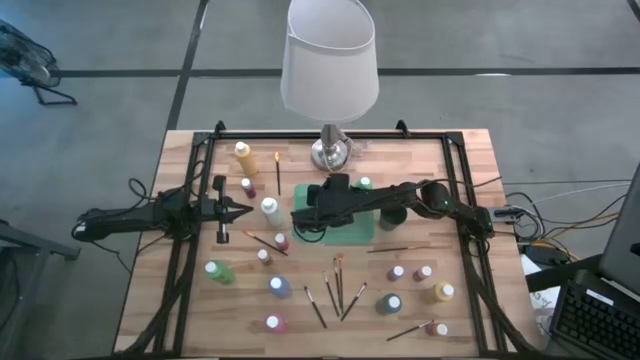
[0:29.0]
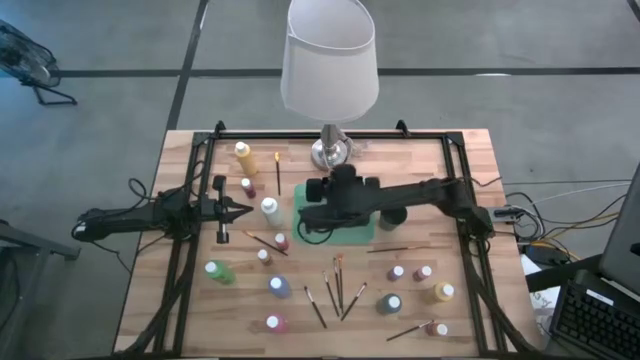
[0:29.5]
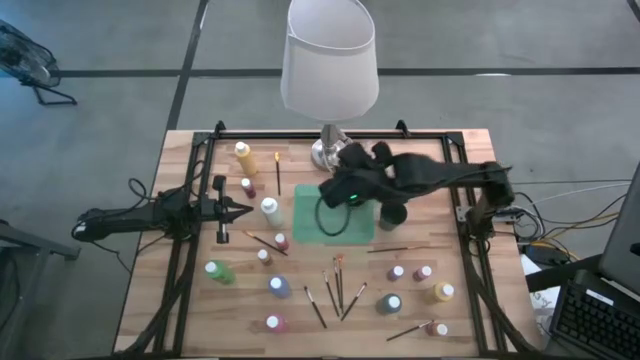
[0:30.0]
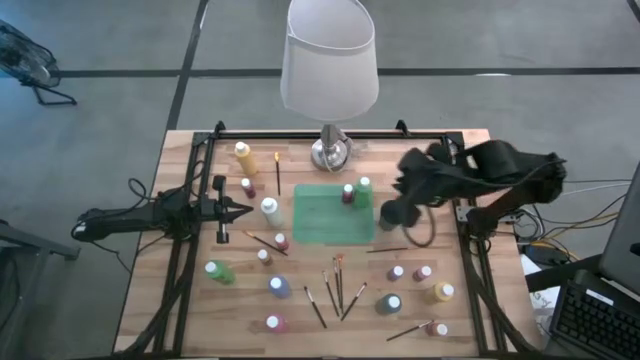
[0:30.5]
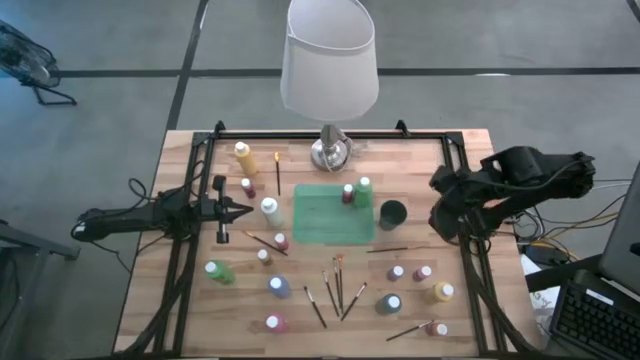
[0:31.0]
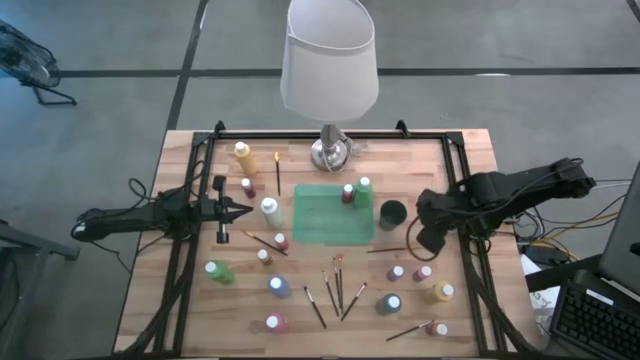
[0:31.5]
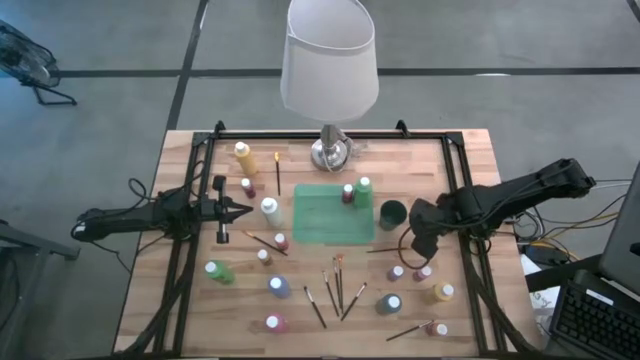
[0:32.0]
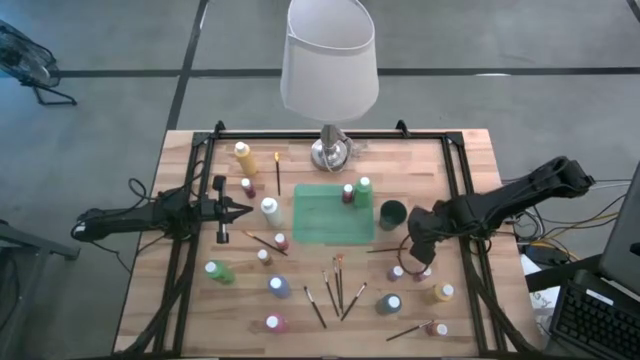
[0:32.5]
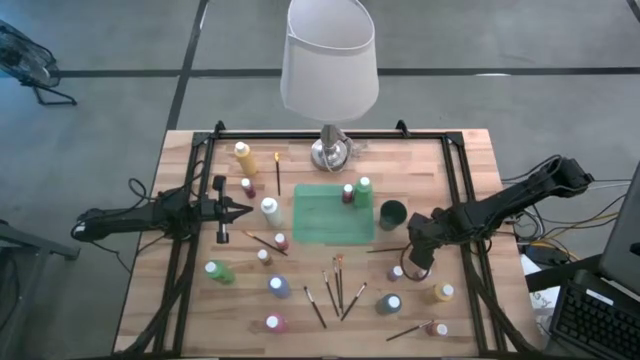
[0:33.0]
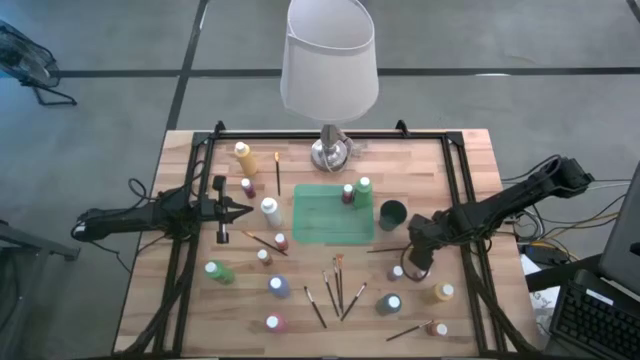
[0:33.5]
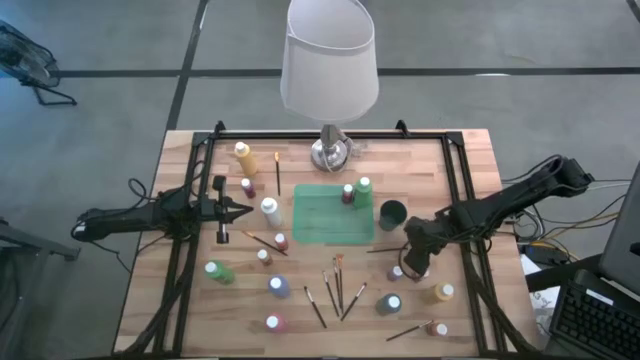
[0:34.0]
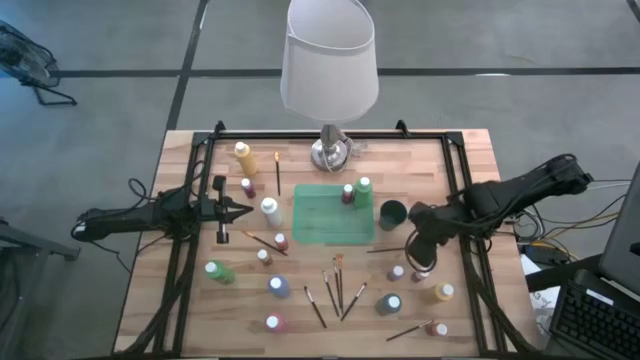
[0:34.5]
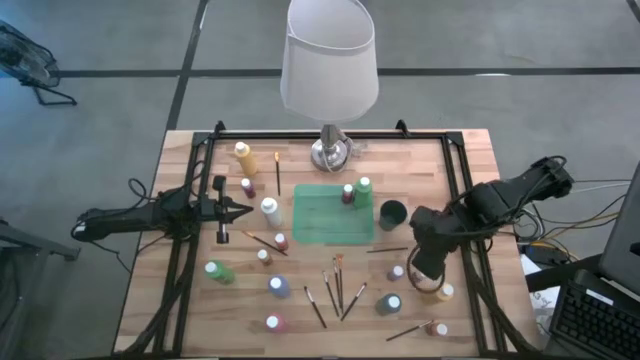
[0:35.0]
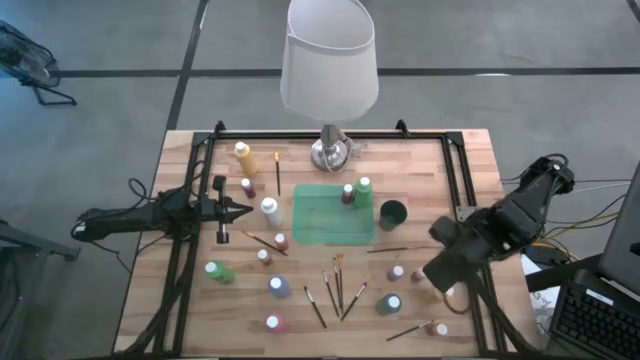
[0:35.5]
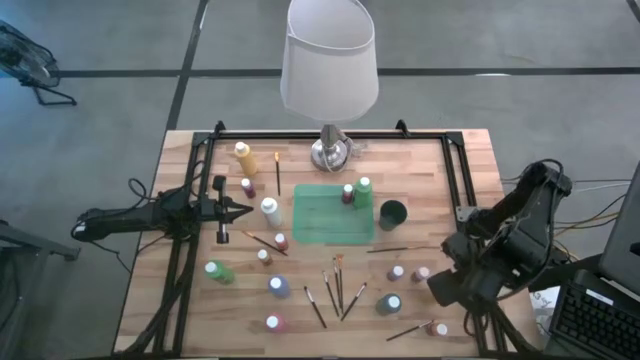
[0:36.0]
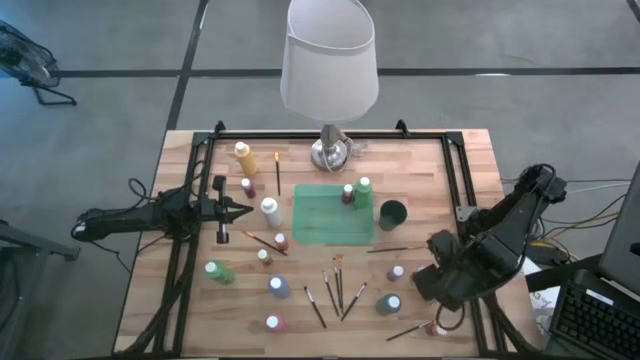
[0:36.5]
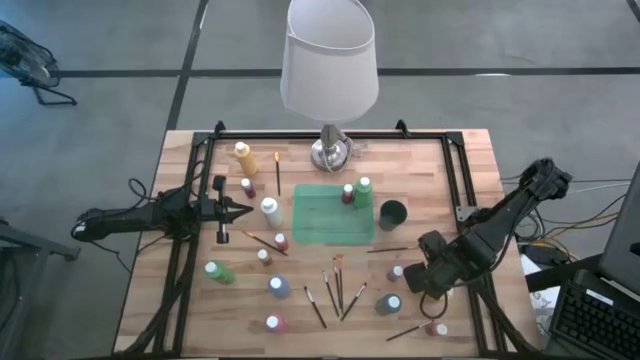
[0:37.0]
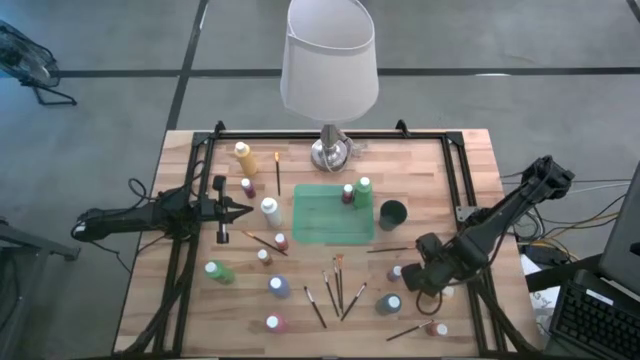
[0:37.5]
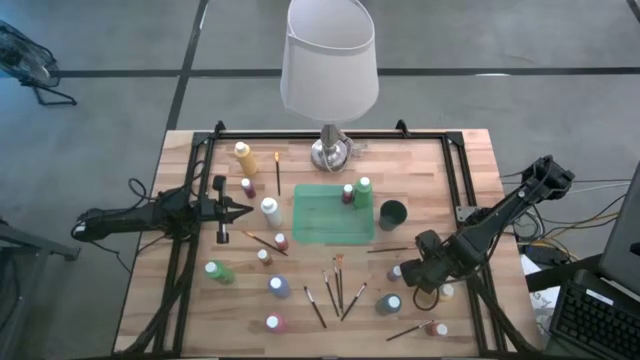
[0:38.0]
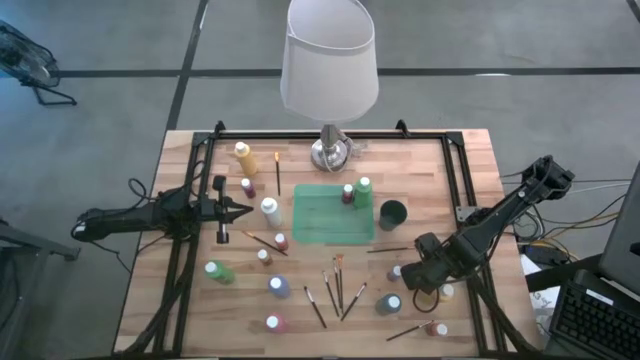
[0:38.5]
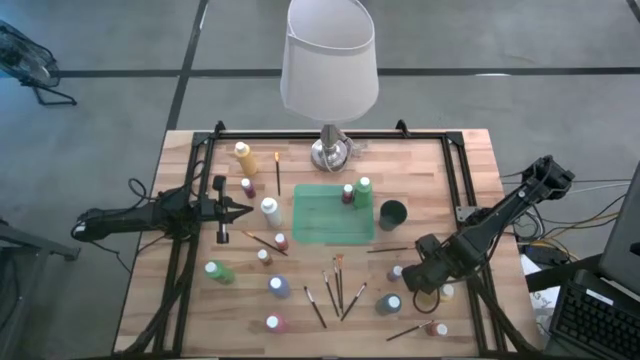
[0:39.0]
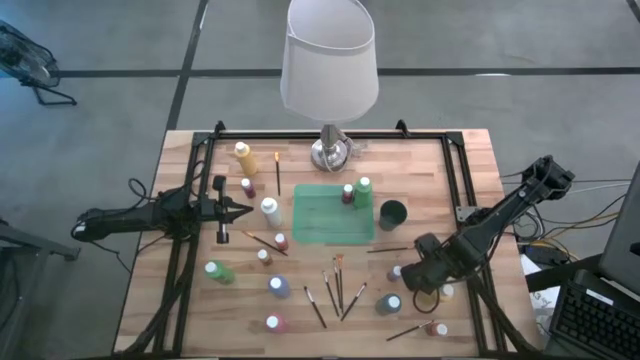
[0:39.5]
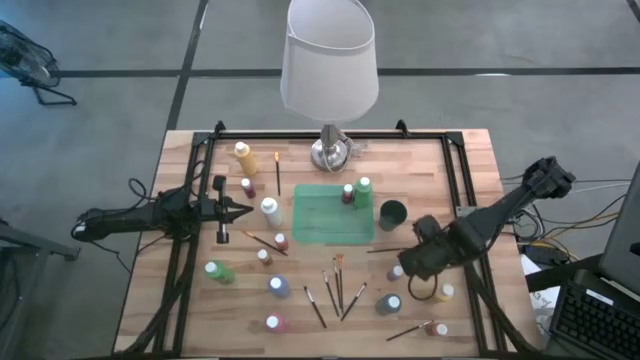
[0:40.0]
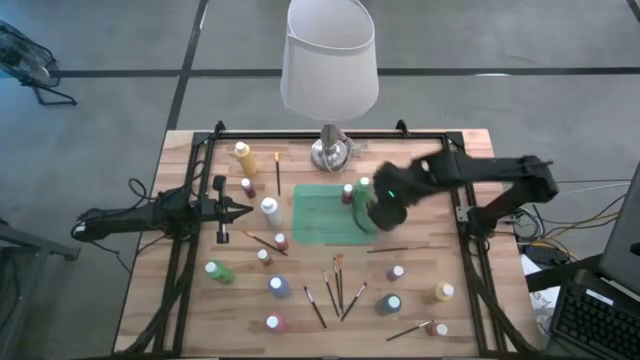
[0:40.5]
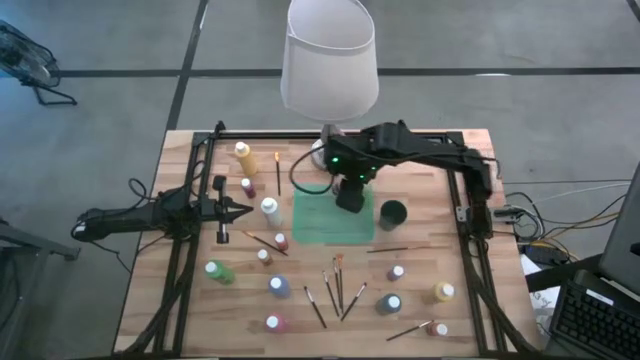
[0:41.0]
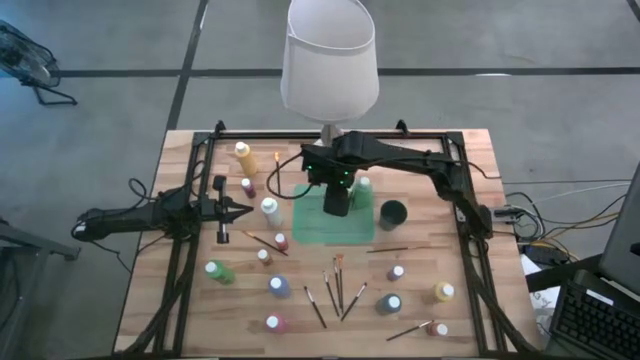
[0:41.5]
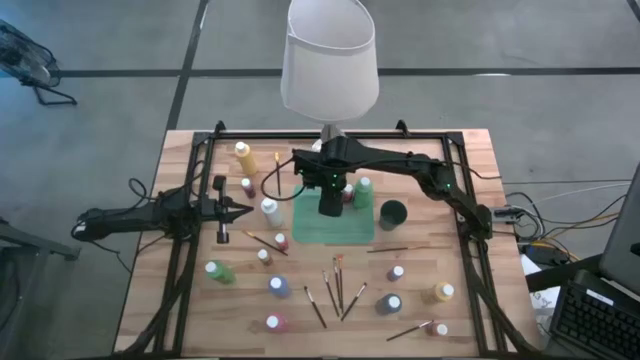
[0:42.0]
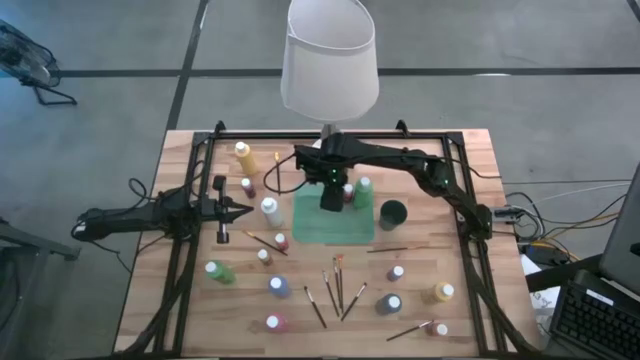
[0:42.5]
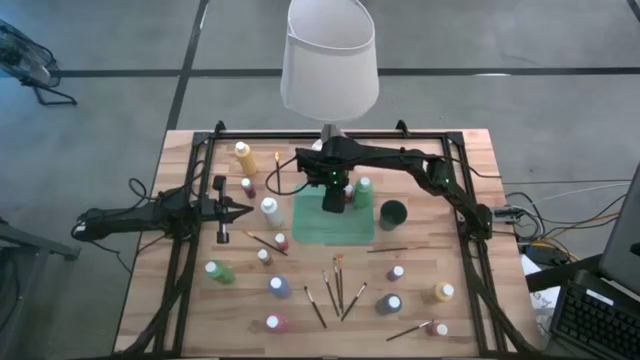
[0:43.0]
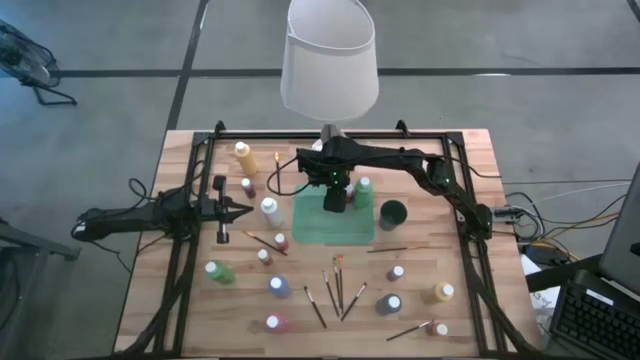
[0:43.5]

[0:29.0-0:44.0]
Task: Pick & Place Paint Supplies
Put the pink paint bottle into the green bin
